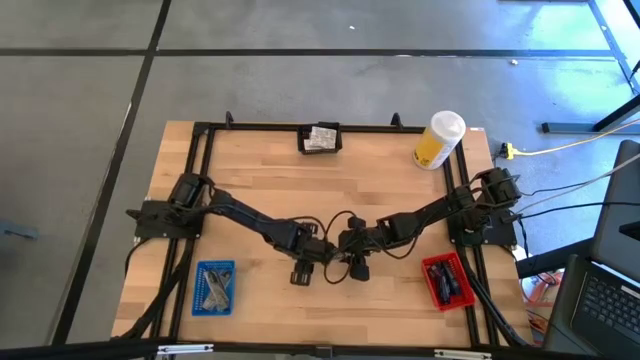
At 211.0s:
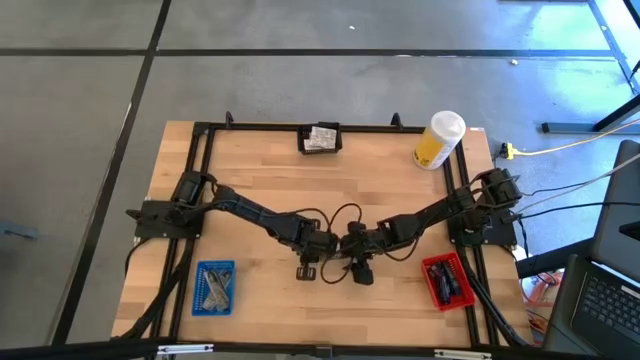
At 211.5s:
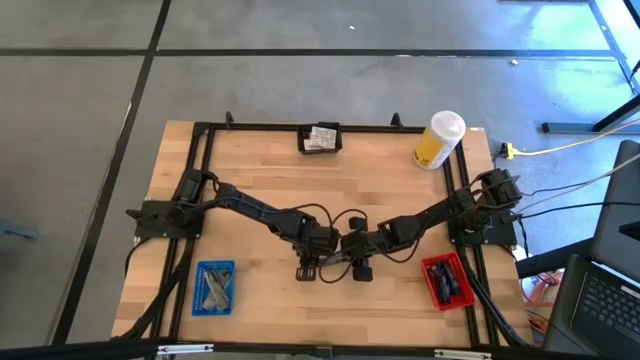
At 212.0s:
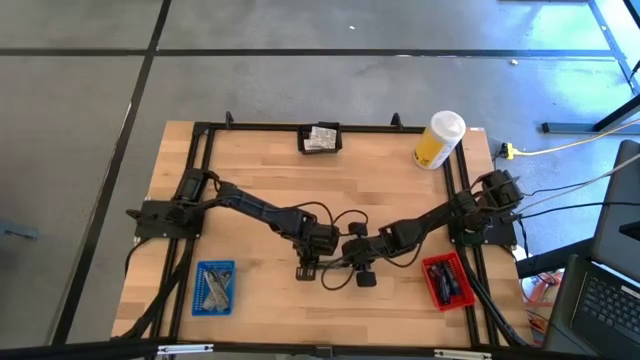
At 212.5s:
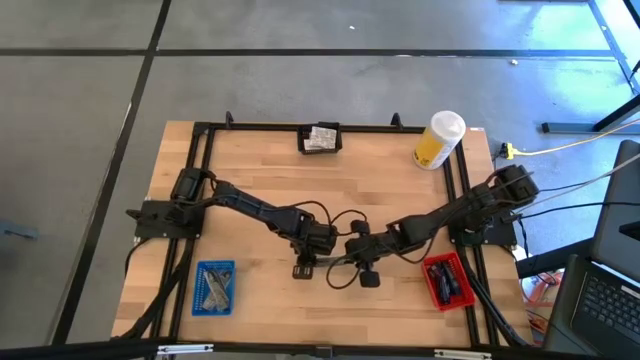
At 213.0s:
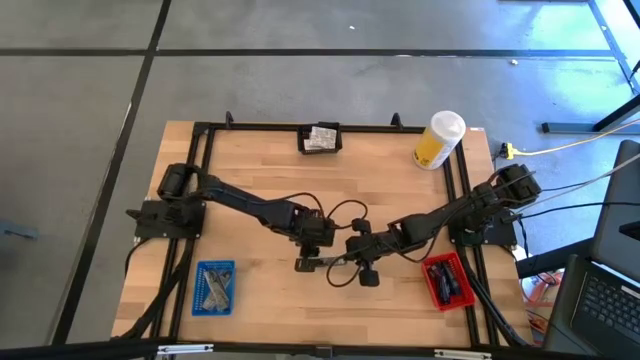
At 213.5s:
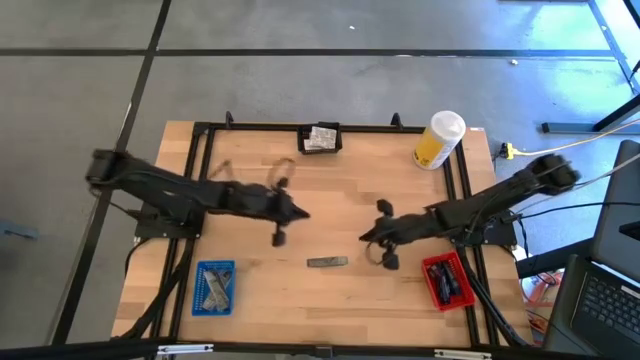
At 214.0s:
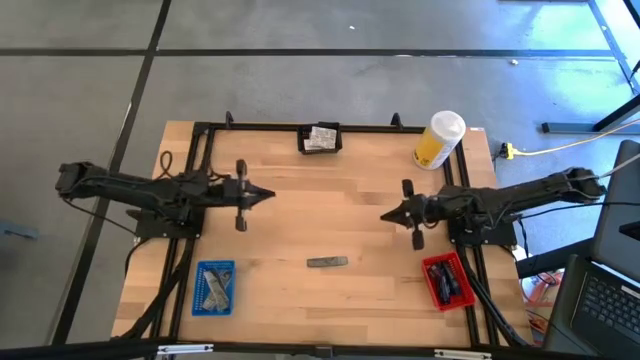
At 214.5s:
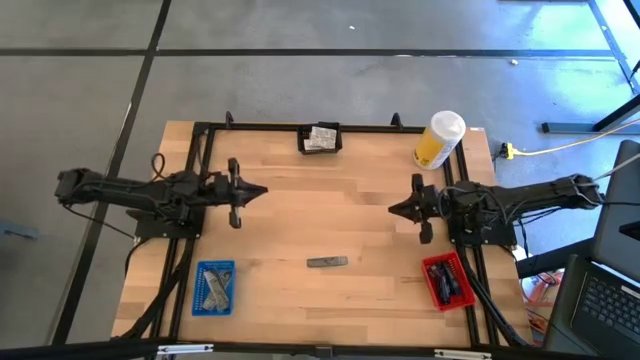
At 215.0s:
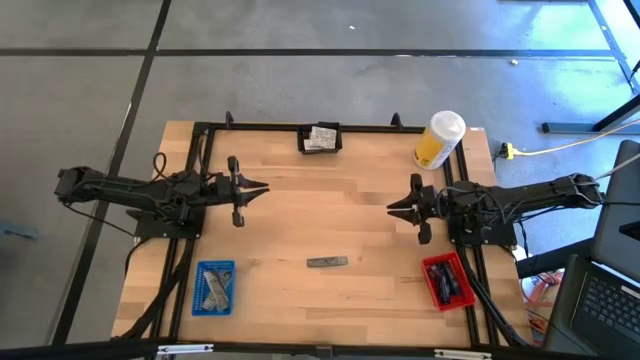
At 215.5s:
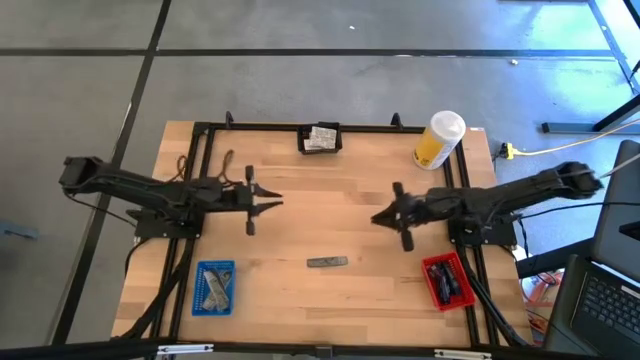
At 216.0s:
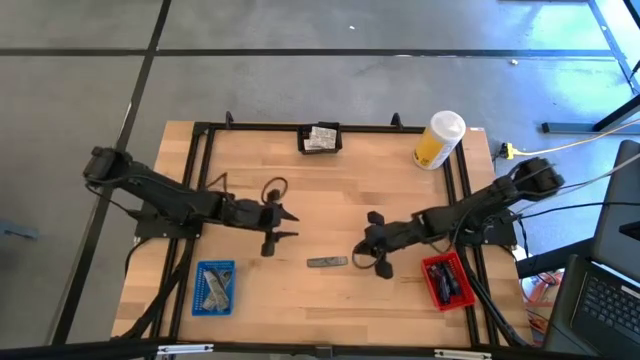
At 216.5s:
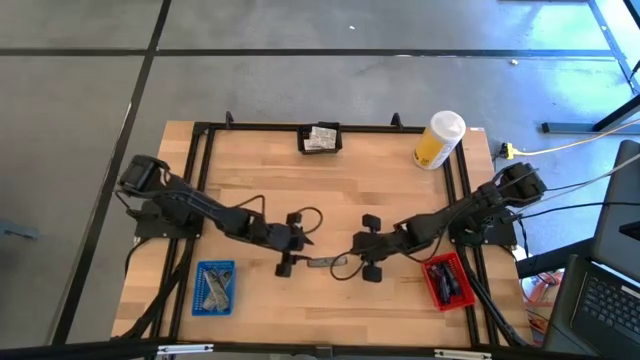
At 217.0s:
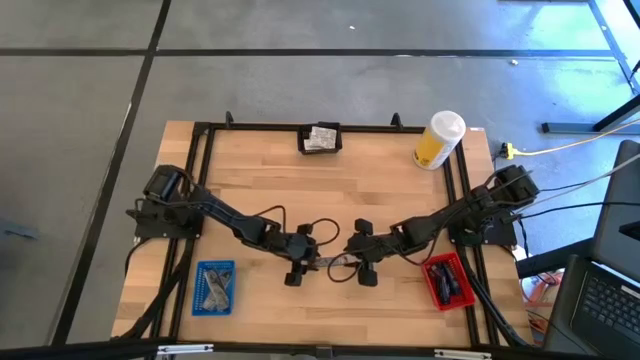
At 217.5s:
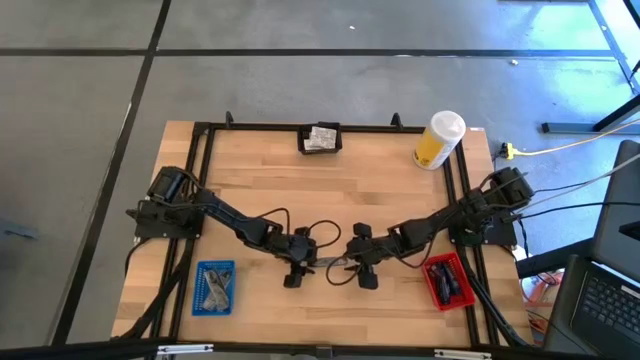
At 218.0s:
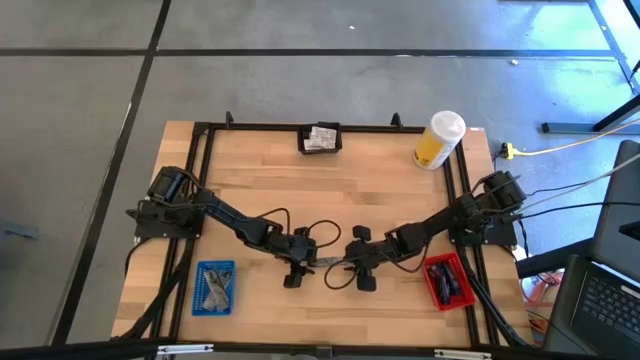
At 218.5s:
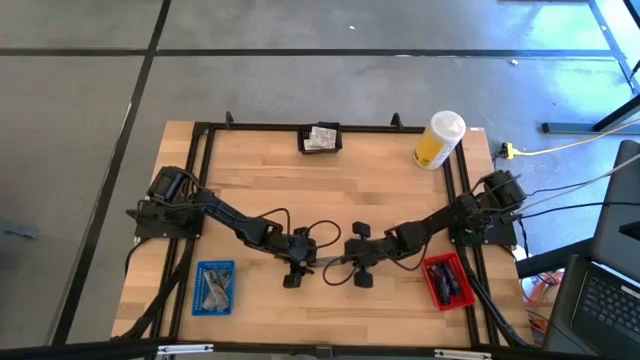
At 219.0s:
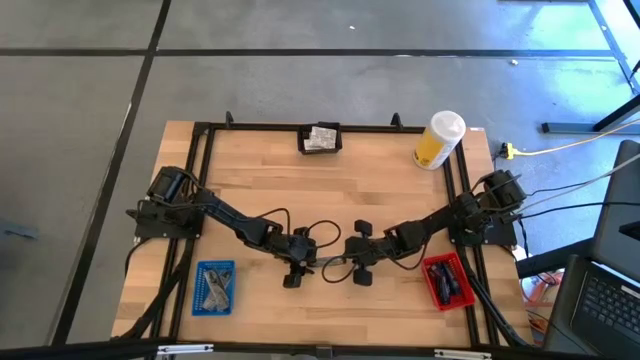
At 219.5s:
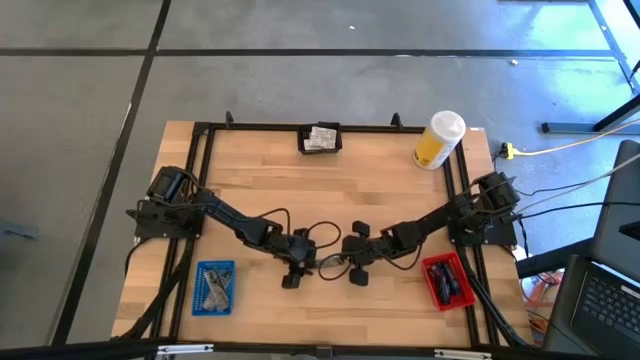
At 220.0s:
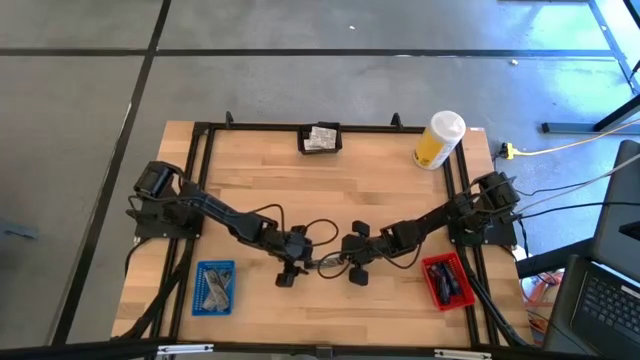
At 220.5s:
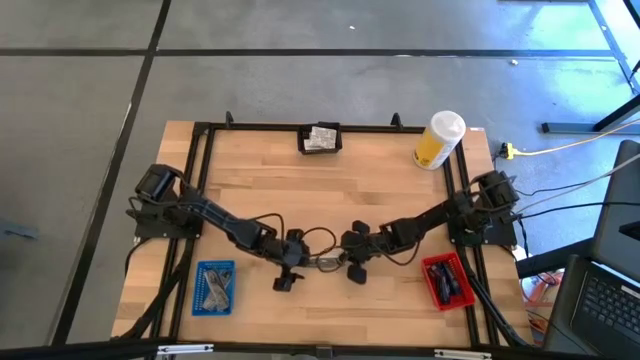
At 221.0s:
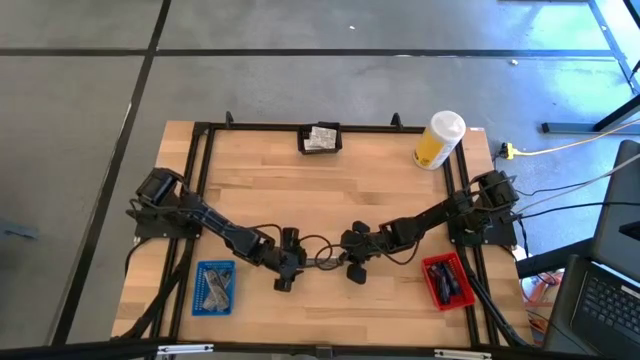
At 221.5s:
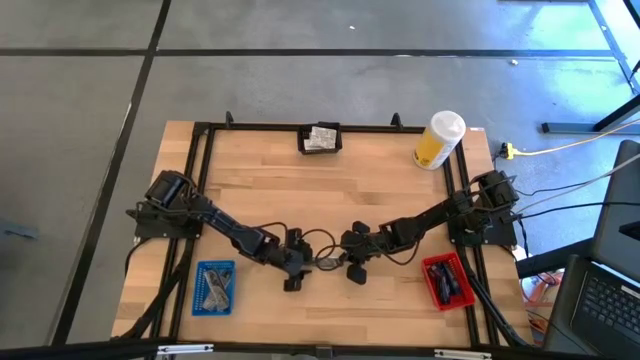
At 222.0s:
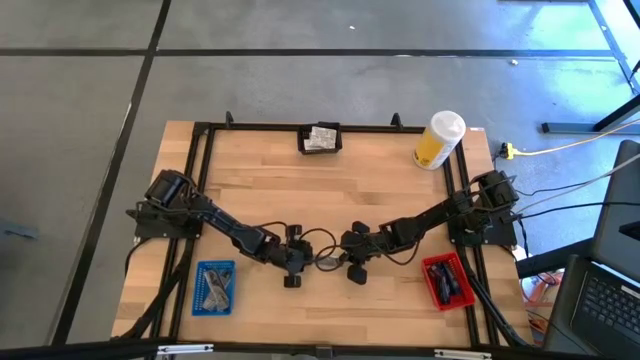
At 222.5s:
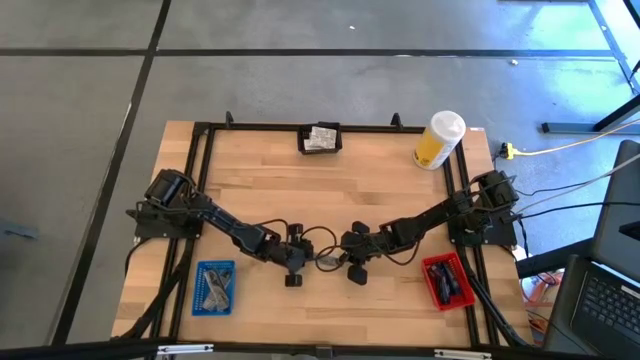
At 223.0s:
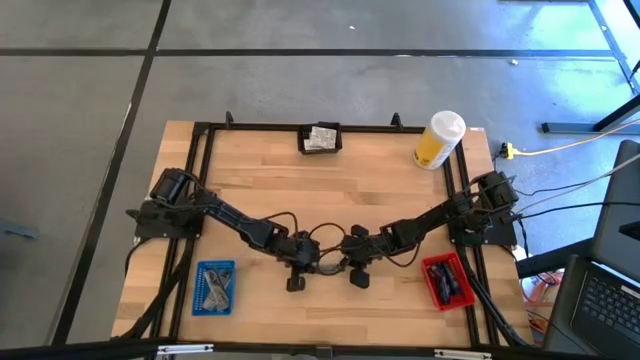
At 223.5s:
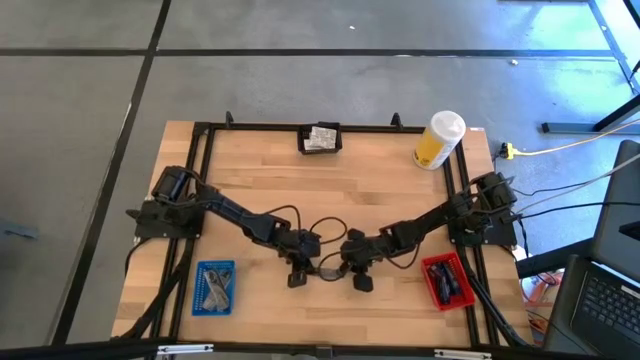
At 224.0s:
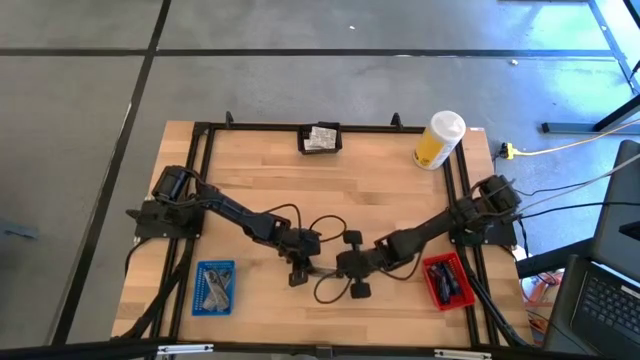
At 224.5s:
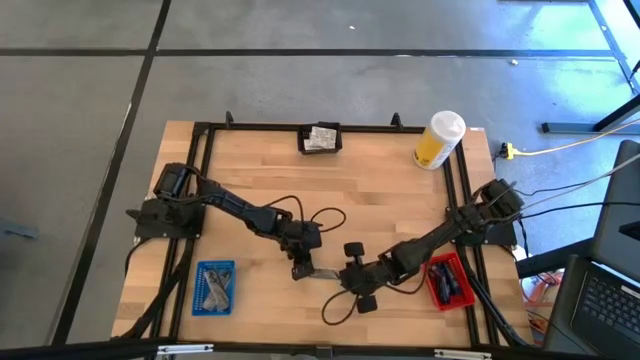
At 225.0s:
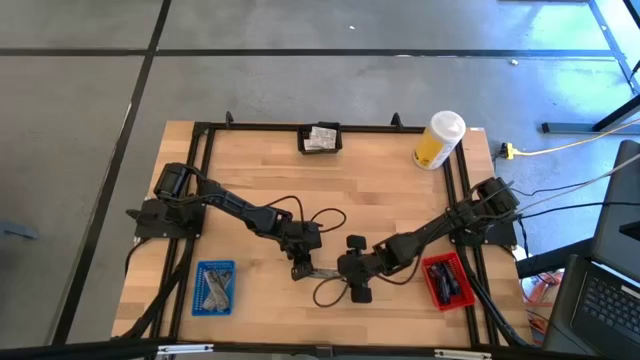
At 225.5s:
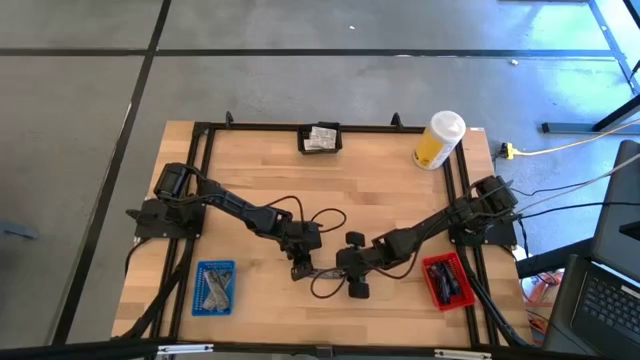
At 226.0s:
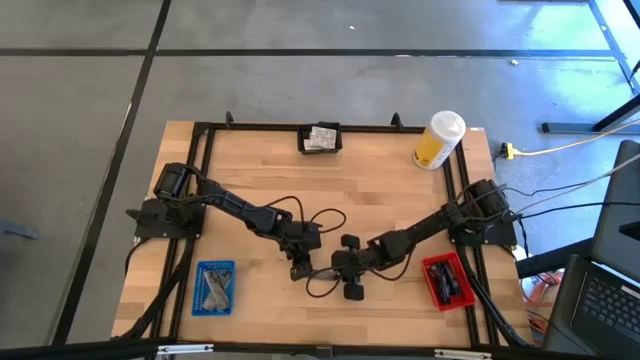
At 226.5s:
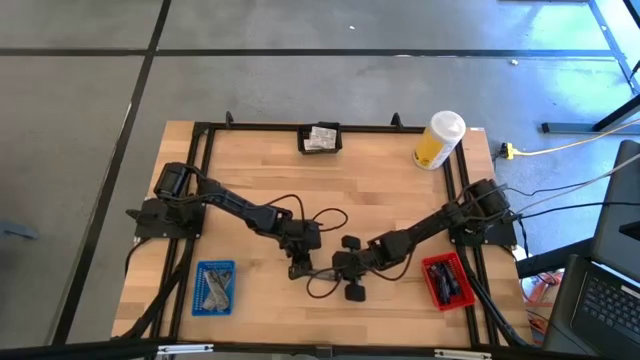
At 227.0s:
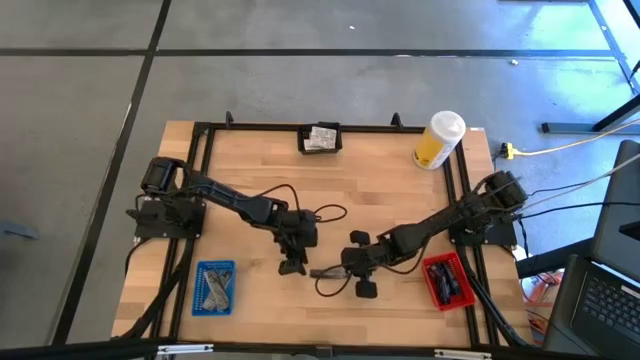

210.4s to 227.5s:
Task: Pick & Place Travel size toiletries
Put the black comb into the blue bin

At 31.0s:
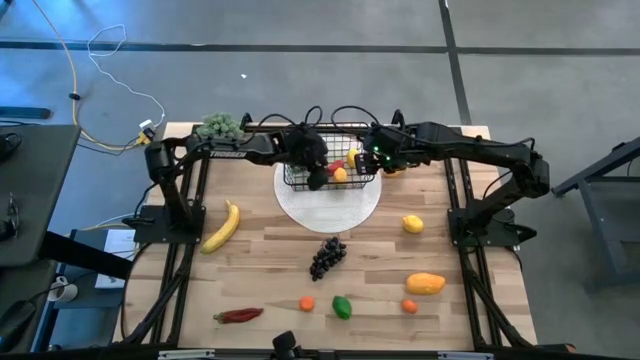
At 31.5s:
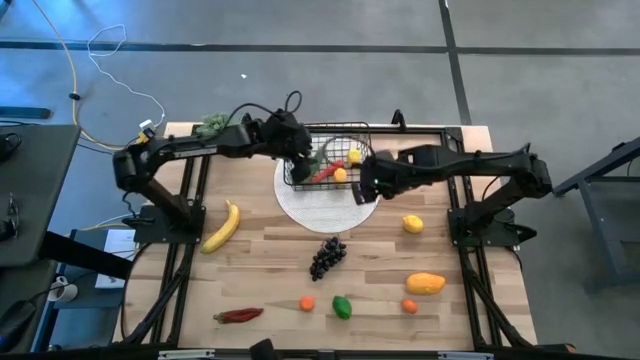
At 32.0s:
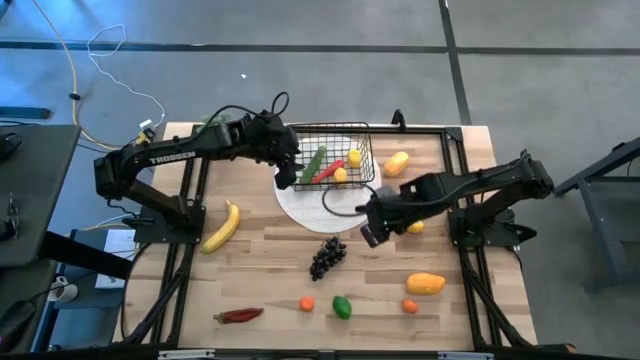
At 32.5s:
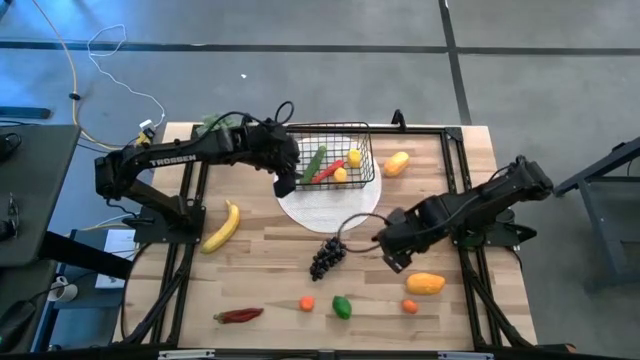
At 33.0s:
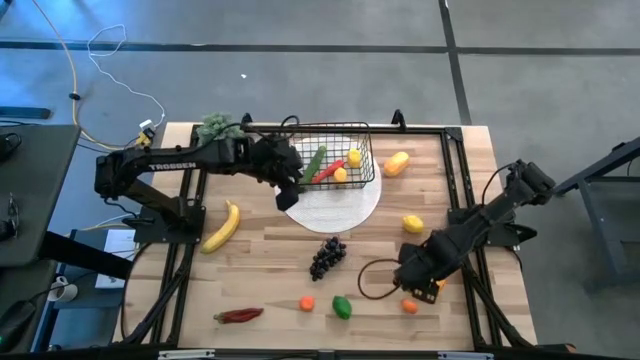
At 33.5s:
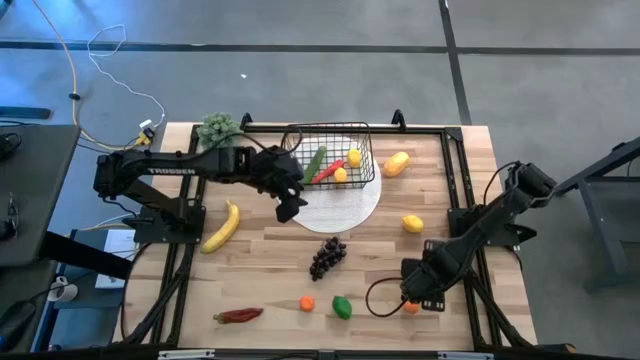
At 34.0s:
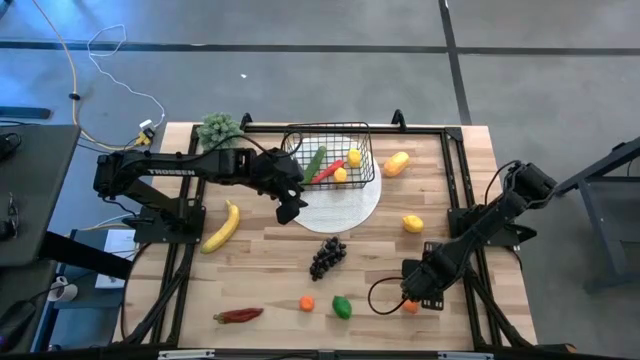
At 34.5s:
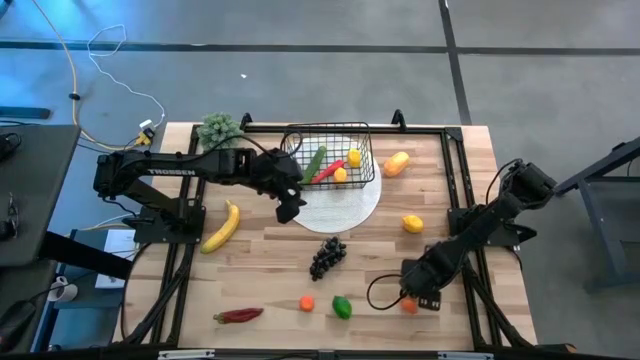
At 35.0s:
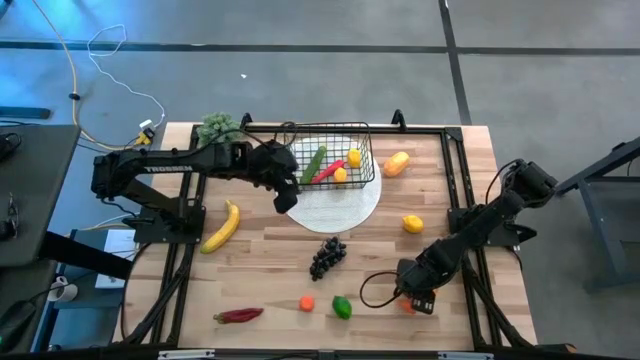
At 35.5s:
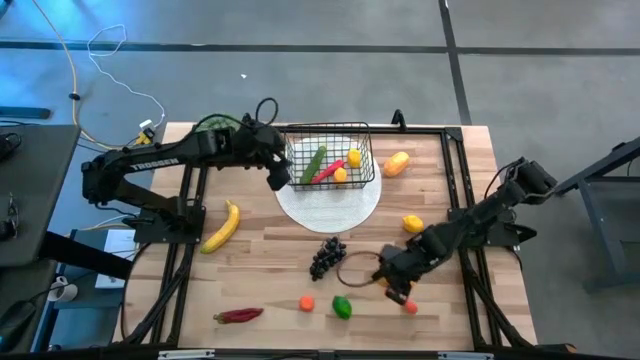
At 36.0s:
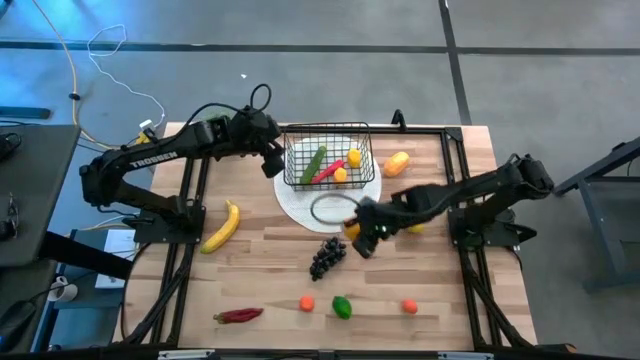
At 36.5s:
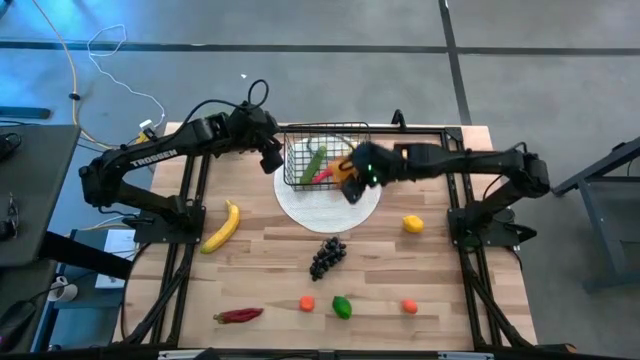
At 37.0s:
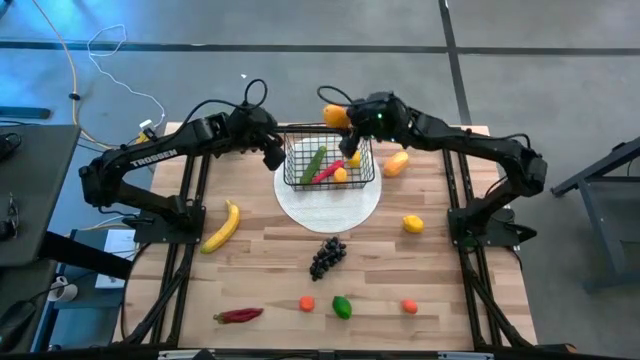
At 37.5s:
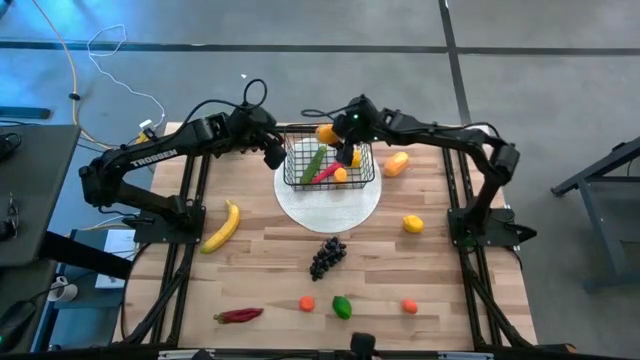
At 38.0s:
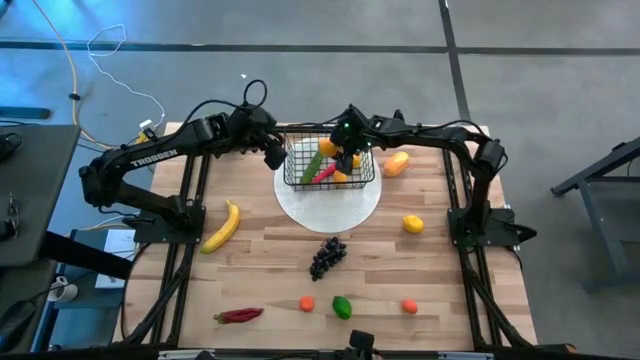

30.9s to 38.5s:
Task: Build produce basket
Put the bottom yellow mango into the black wire basket
